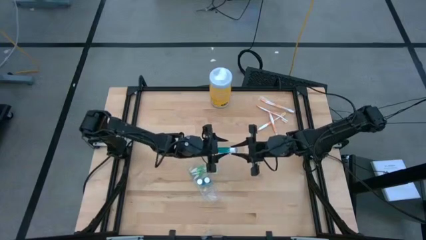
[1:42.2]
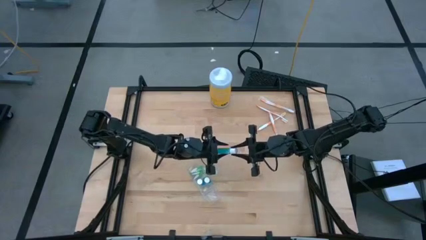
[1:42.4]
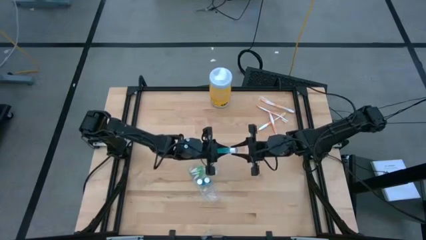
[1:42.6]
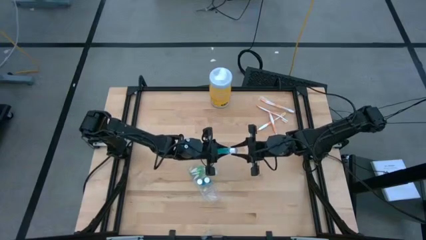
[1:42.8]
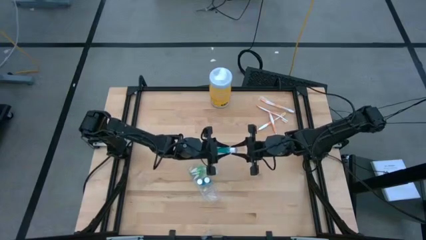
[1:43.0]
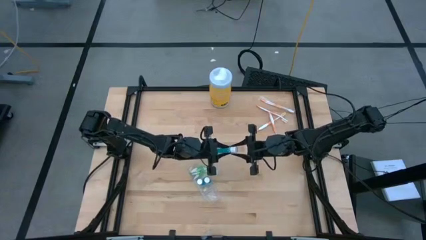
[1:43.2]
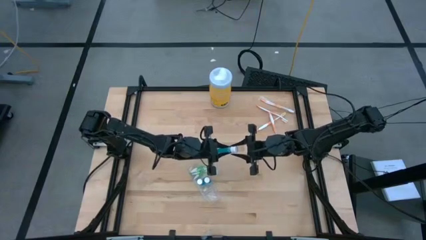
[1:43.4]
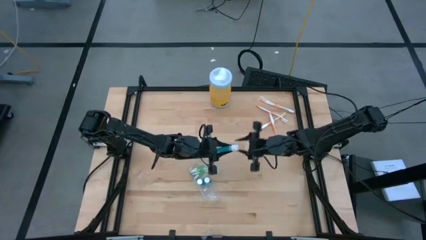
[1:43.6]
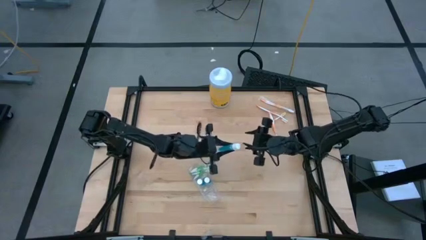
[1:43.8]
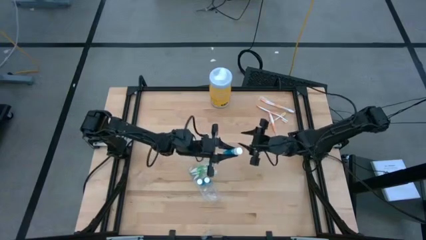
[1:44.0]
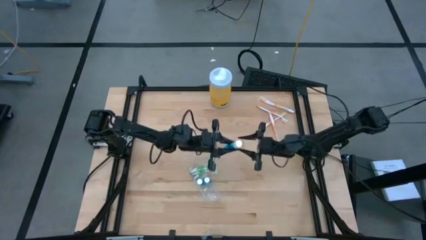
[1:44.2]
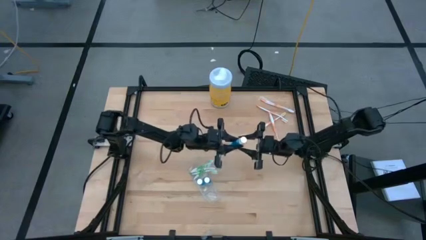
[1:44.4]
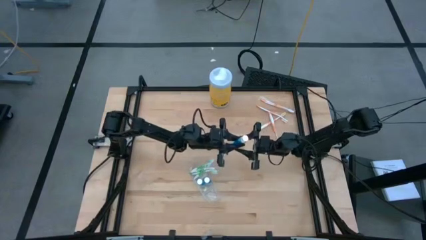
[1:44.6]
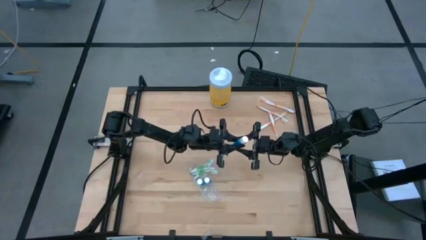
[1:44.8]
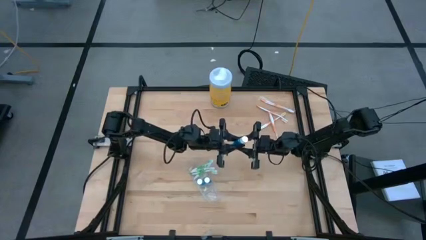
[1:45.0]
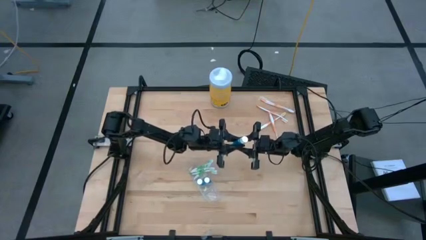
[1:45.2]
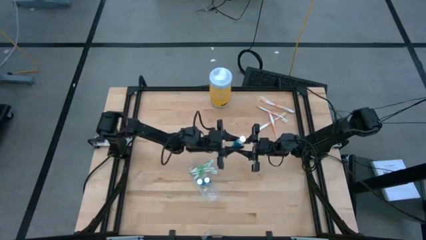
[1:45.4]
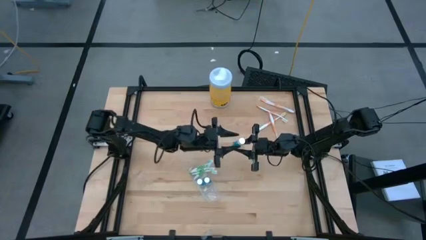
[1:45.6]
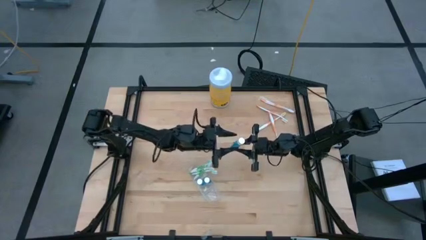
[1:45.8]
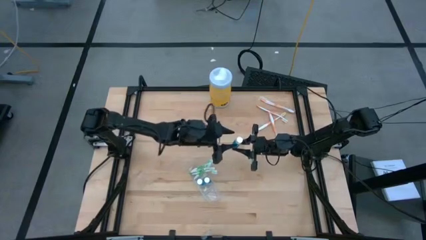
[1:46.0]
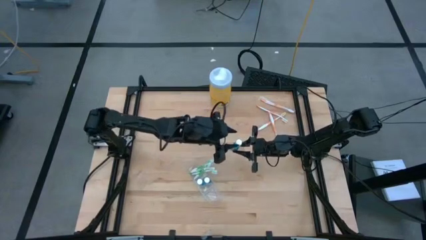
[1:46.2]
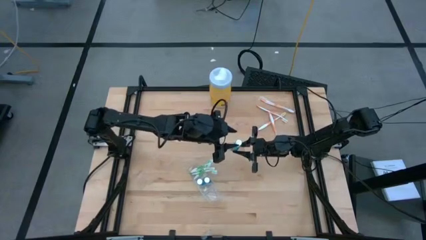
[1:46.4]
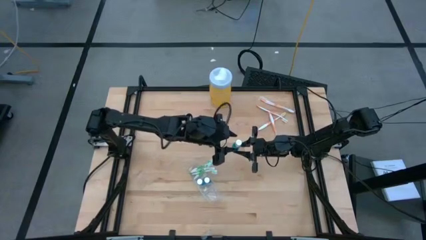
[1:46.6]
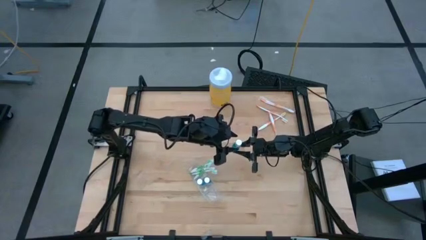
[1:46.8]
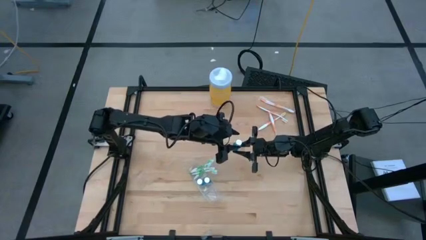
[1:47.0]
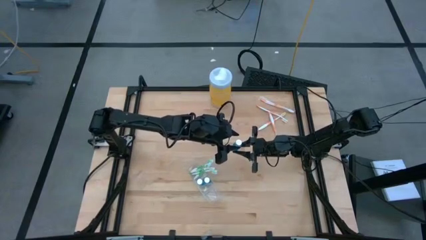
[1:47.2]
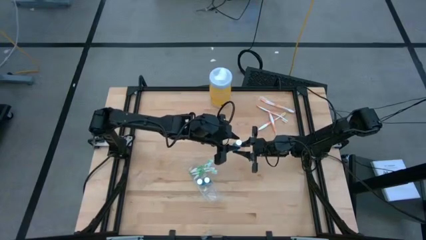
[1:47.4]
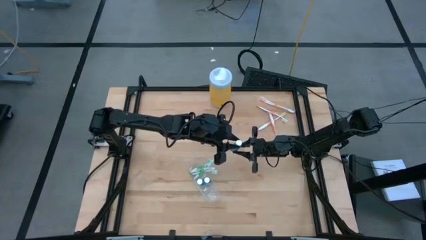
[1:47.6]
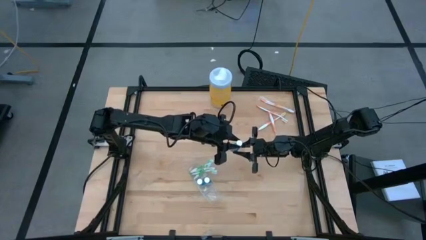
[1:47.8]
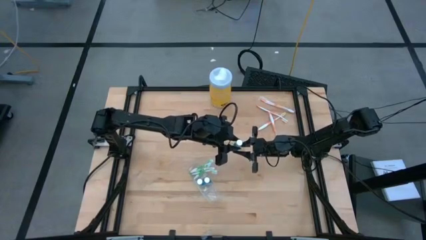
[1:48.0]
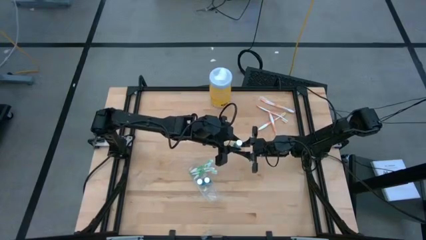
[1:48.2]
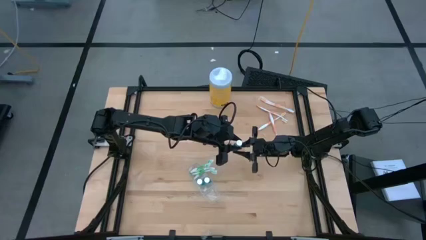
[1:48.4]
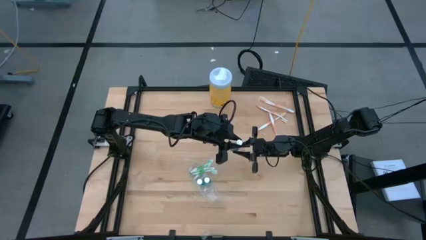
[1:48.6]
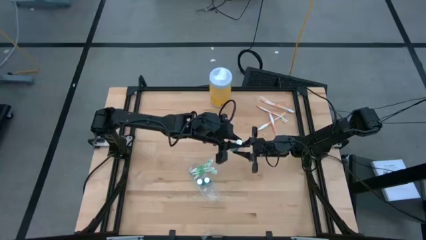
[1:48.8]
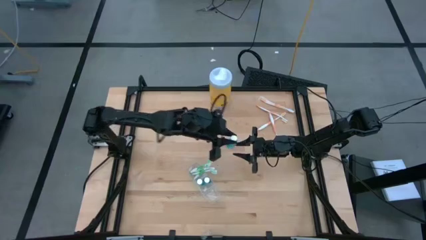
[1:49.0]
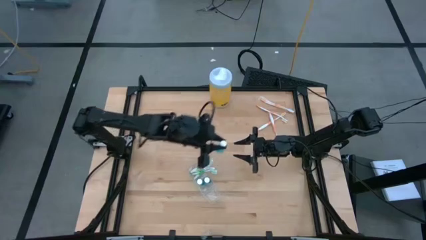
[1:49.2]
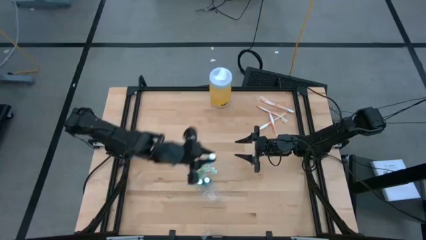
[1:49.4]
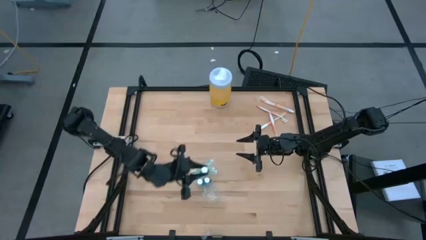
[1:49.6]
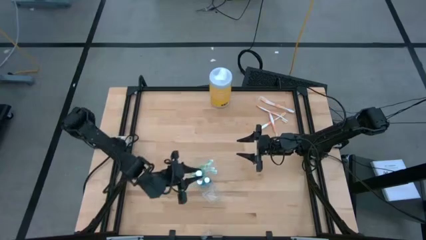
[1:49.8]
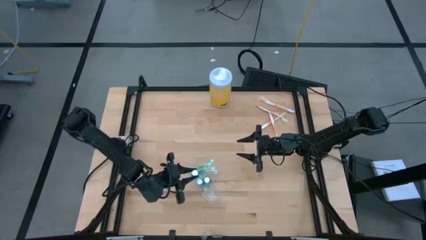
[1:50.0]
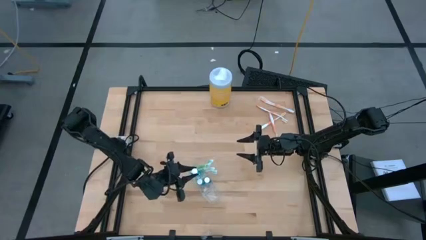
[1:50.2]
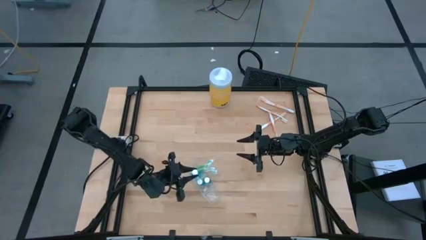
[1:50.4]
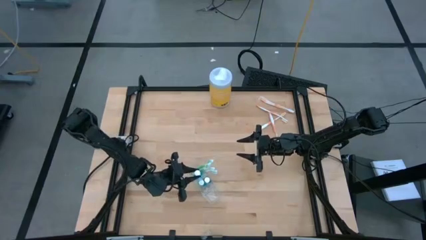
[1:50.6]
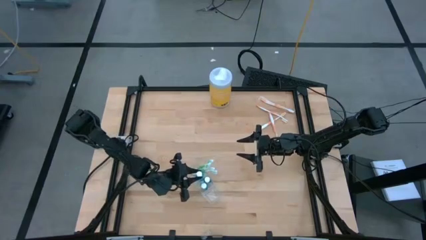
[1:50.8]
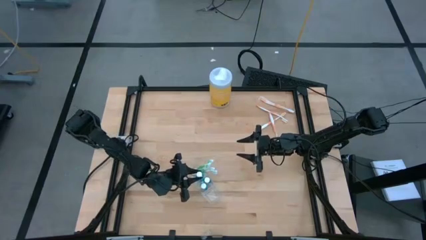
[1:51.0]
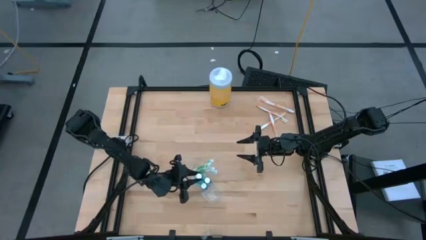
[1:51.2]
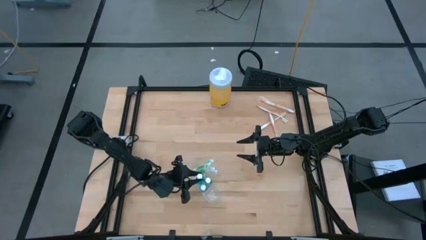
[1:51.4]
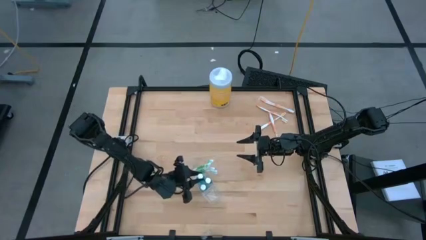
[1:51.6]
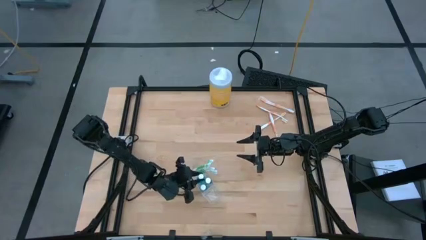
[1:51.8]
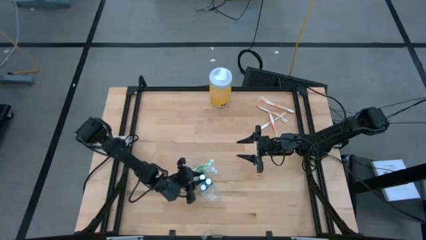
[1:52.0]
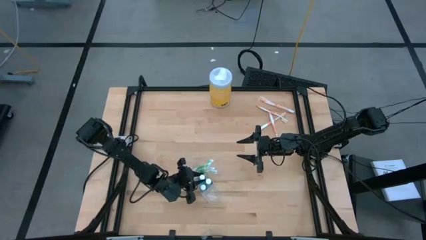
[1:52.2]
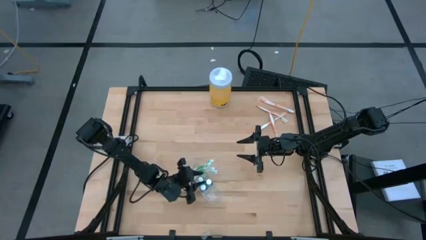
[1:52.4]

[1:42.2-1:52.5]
Task: Pick & Place toothbrushing station
Put the blue mouthwash into the transparent organizer

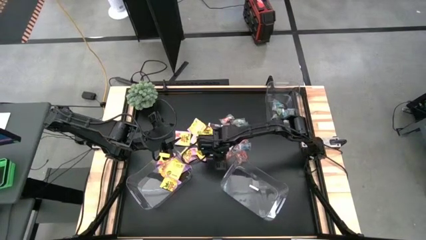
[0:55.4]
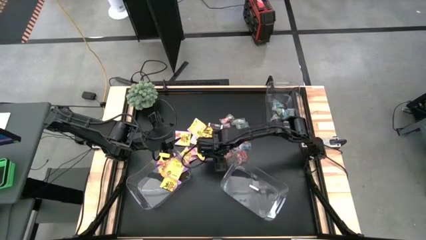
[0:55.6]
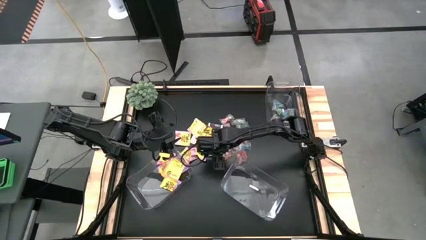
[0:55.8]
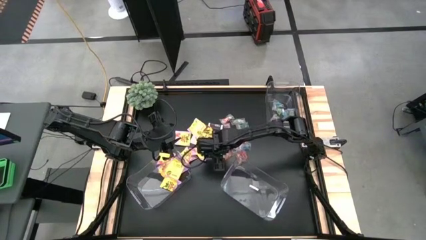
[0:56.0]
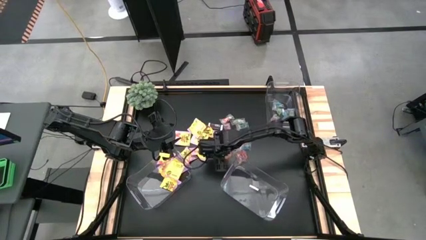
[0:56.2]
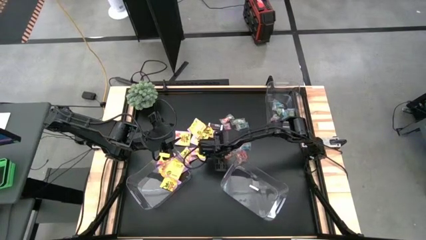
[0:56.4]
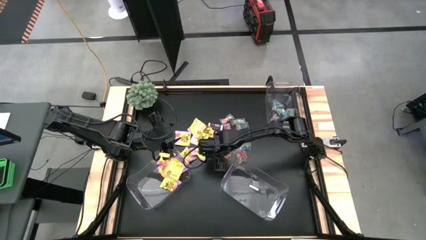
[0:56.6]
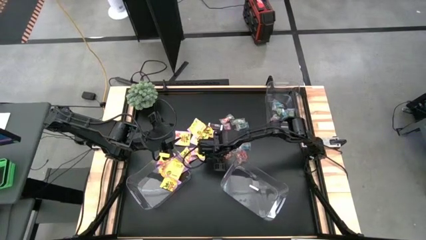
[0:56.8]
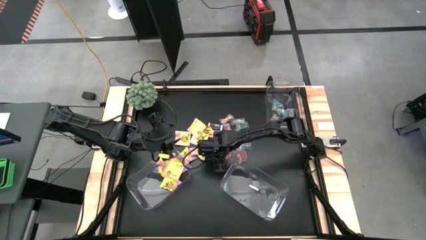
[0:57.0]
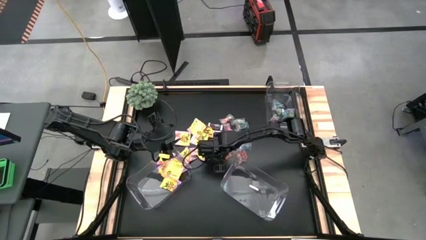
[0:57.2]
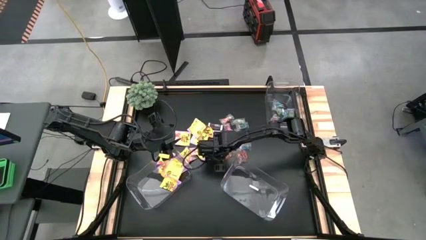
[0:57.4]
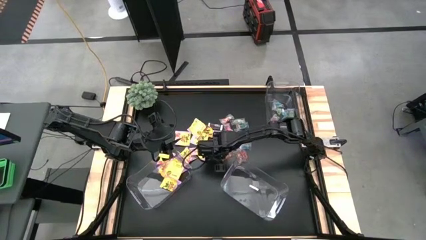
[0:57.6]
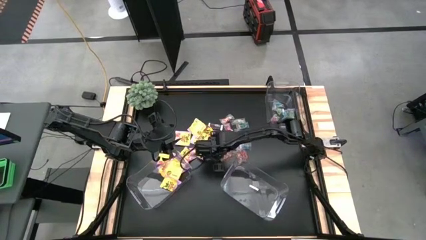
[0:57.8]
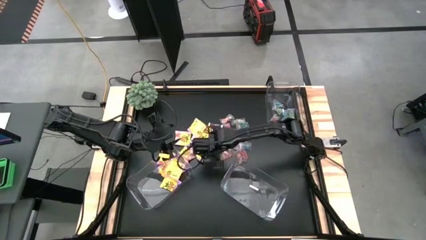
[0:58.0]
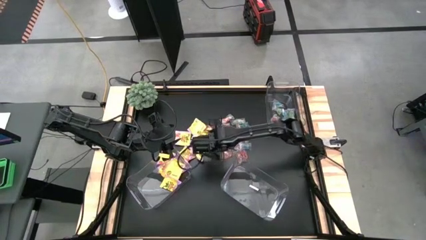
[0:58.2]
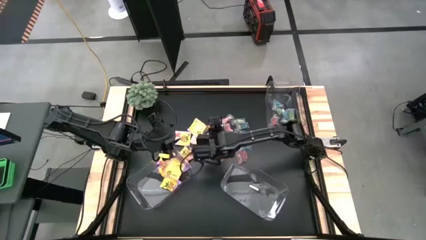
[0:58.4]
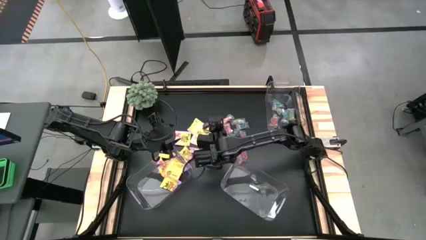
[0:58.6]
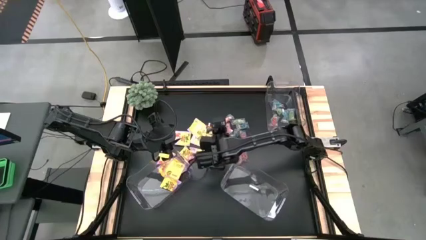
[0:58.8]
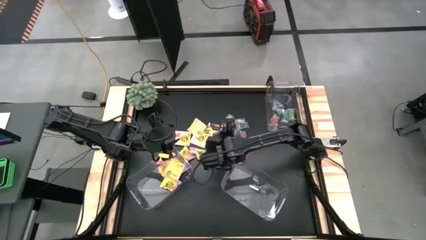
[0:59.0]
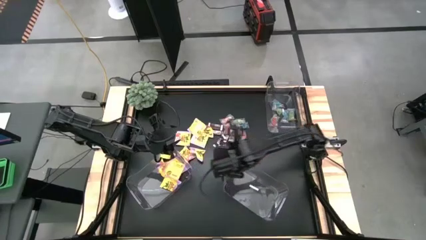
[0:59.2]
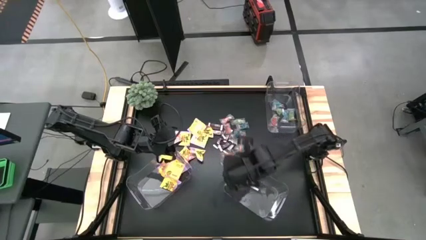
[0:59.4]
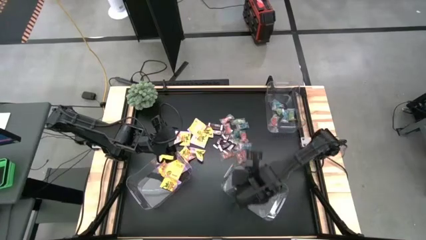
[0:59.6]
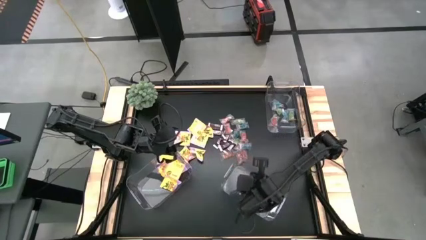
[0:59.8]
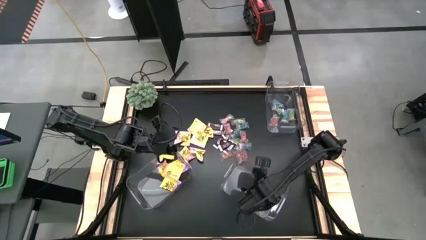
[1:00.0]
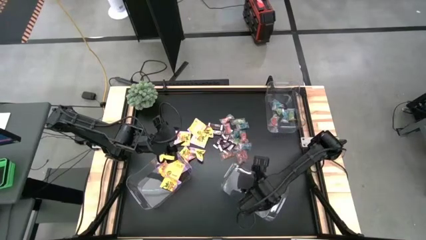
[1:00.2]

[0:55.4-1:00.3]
Task: Sort candy
Put the brown candy in the bottom right transparent container

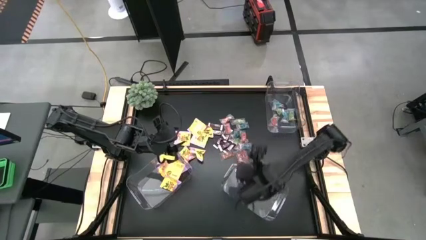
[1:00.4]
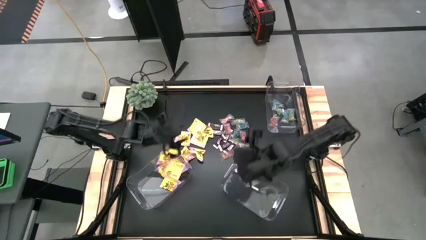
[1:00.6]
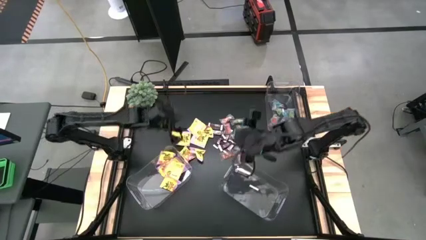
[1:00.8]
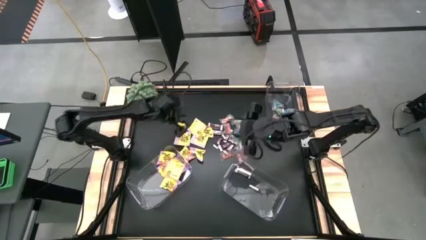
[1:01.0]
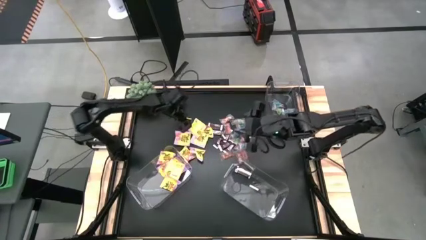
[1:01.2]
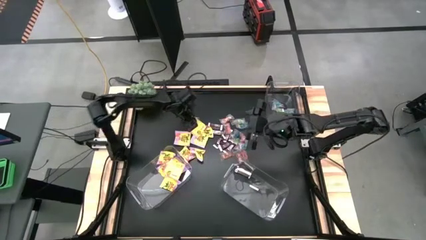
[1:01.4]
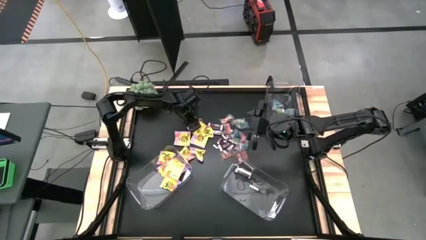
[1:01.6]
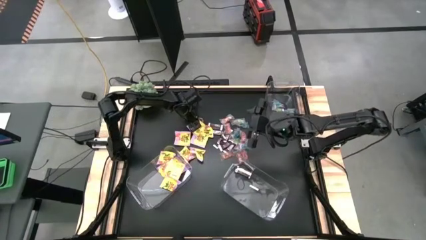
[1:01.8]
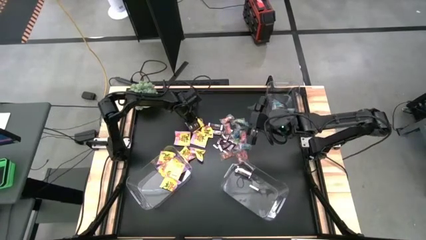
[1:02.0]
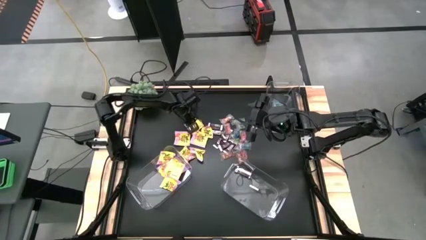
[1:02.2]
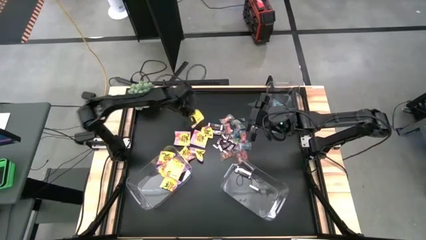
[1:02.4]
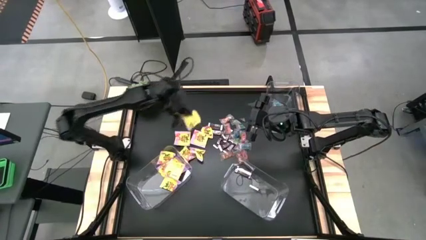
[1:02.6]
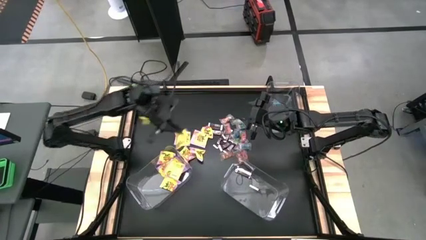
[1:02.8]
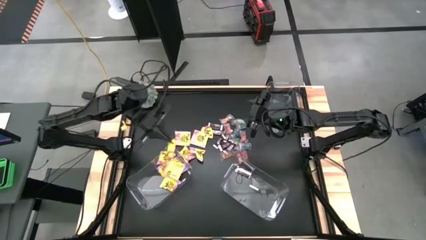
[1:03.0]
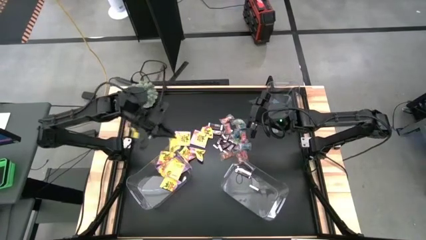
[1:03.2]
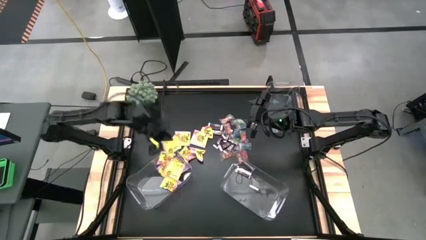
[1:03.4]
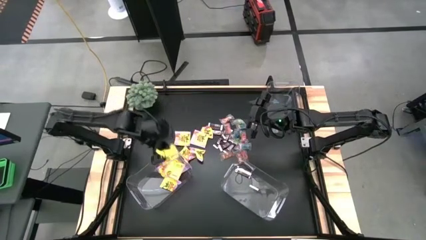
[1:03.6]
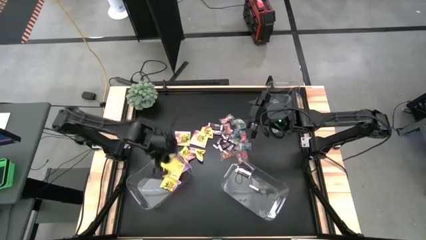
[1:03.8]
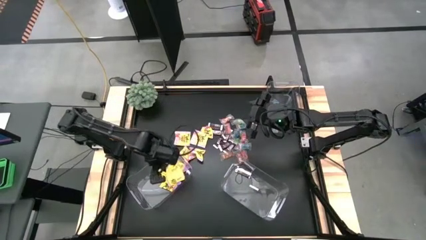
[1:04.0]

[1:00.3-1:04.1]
Put the yellow candy in the bottom left transparent container
